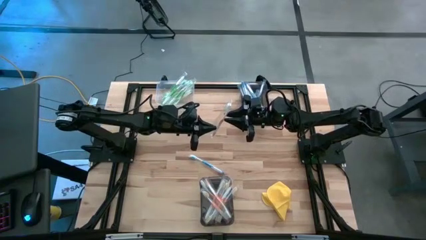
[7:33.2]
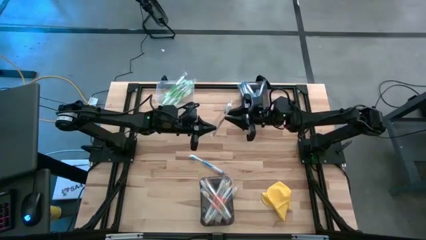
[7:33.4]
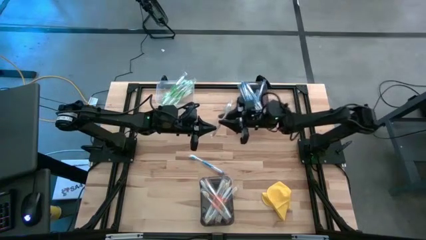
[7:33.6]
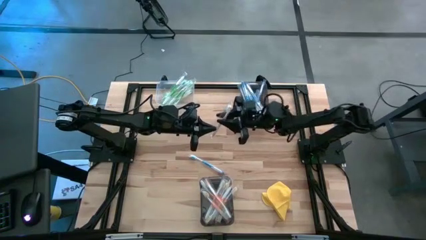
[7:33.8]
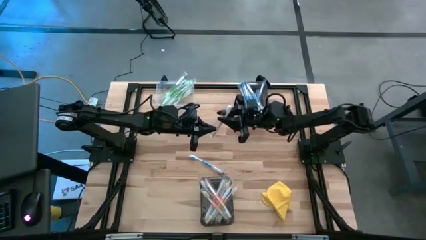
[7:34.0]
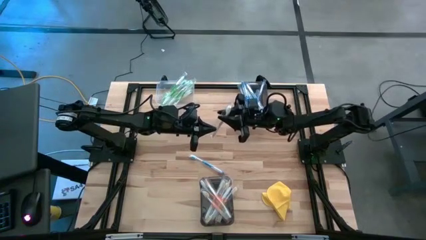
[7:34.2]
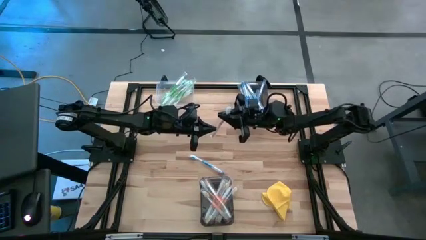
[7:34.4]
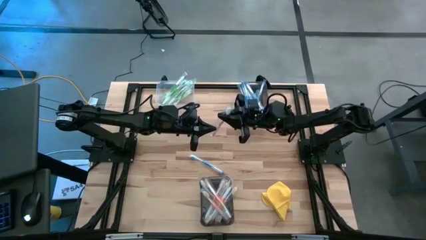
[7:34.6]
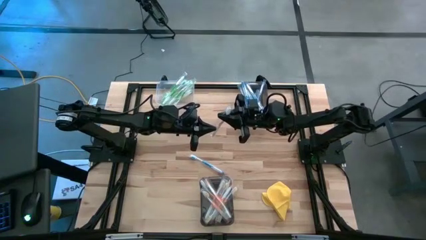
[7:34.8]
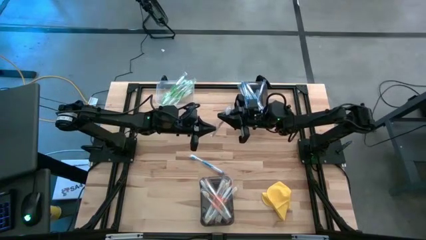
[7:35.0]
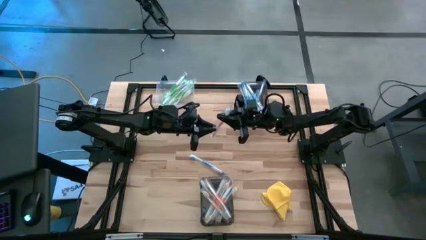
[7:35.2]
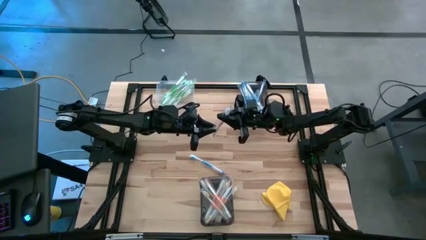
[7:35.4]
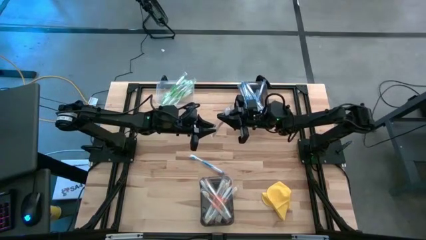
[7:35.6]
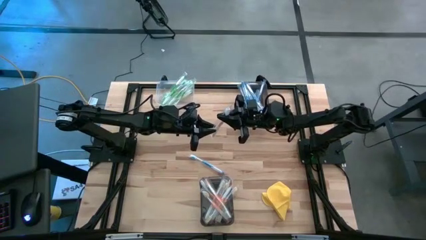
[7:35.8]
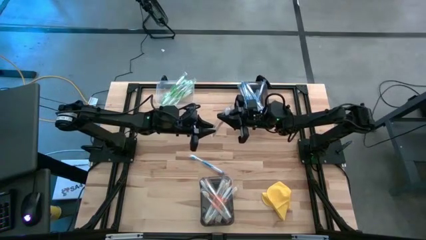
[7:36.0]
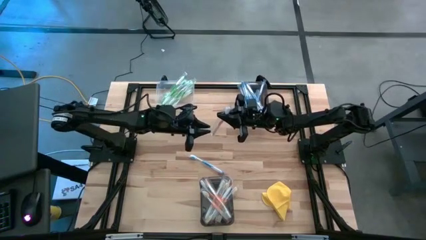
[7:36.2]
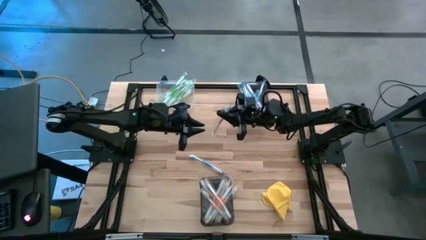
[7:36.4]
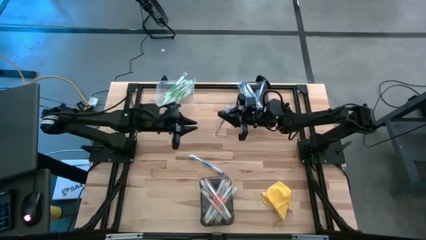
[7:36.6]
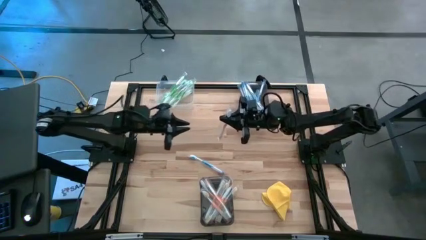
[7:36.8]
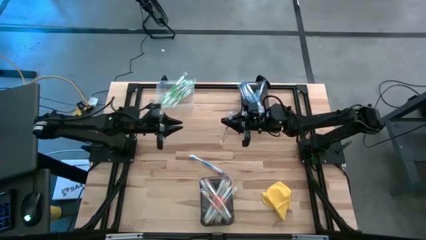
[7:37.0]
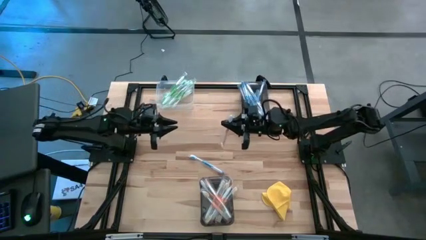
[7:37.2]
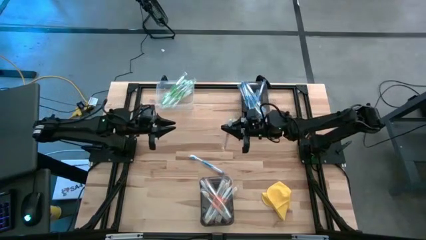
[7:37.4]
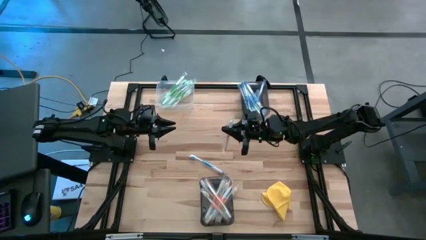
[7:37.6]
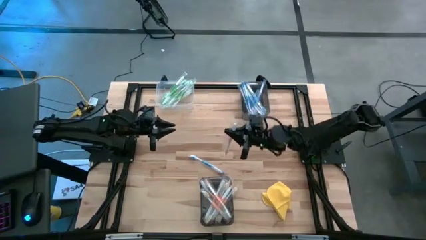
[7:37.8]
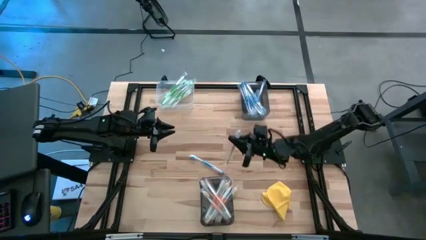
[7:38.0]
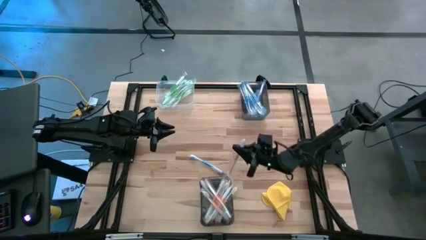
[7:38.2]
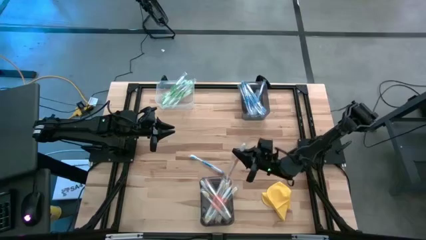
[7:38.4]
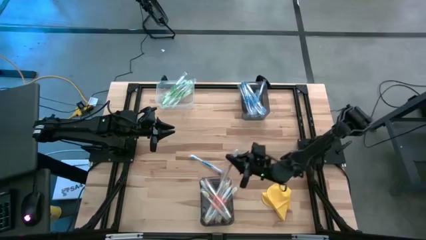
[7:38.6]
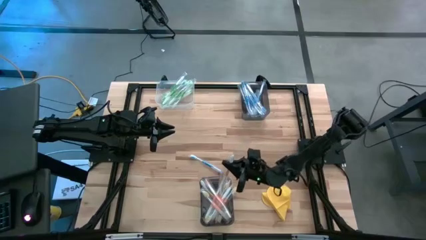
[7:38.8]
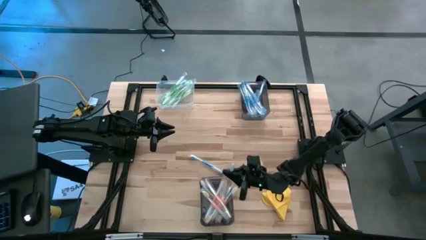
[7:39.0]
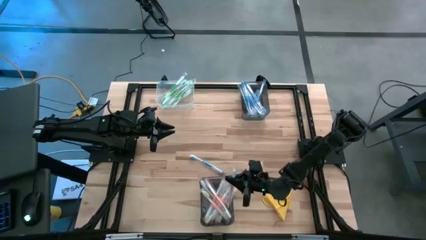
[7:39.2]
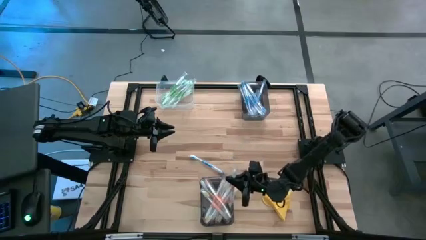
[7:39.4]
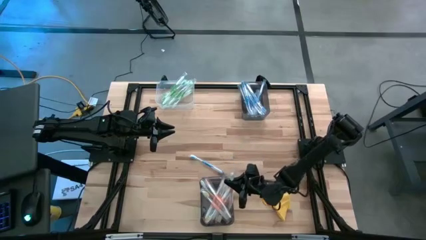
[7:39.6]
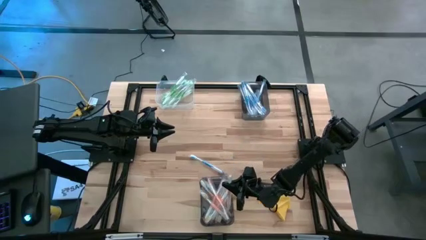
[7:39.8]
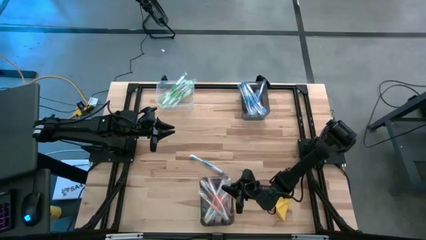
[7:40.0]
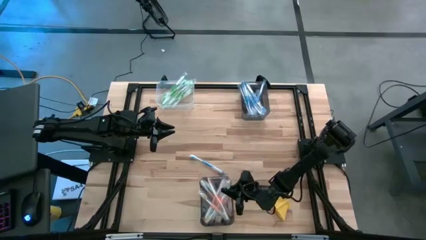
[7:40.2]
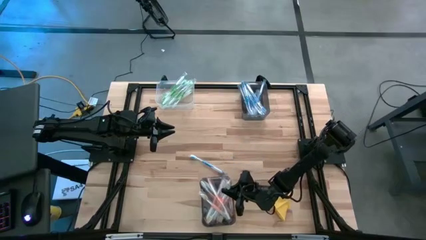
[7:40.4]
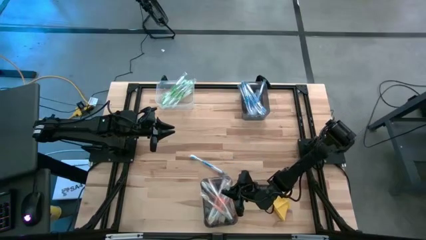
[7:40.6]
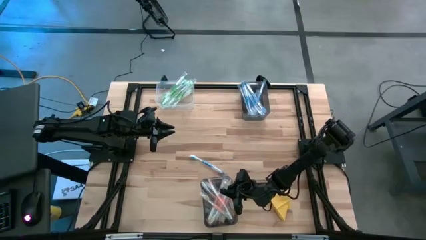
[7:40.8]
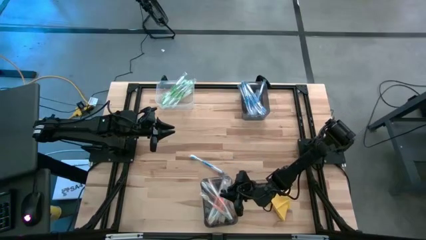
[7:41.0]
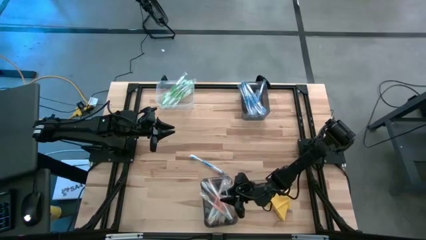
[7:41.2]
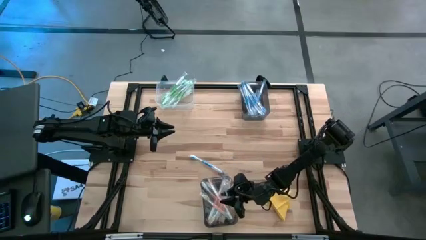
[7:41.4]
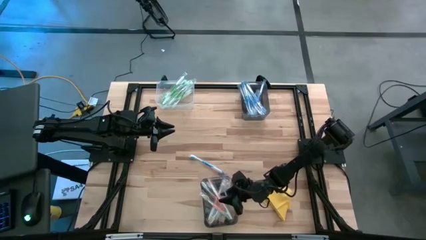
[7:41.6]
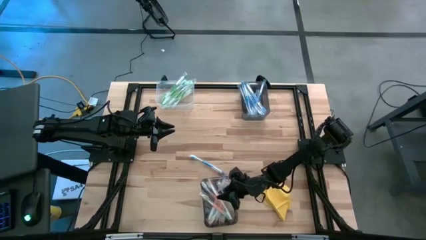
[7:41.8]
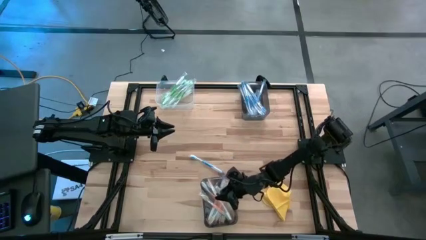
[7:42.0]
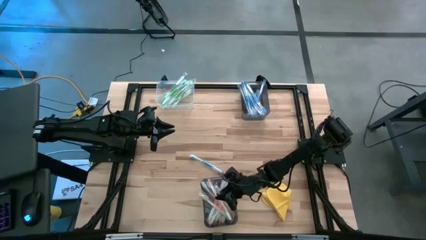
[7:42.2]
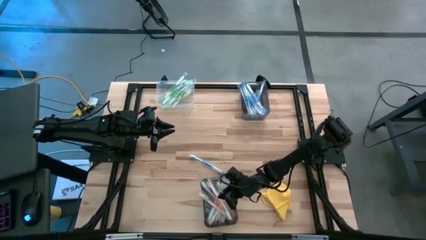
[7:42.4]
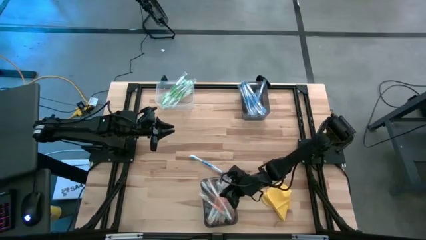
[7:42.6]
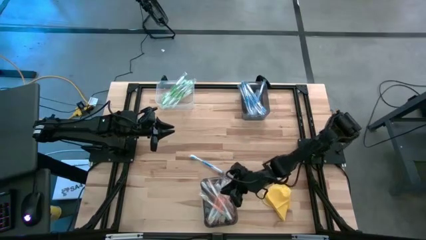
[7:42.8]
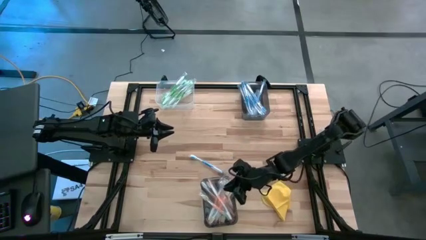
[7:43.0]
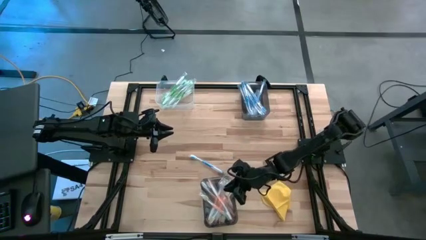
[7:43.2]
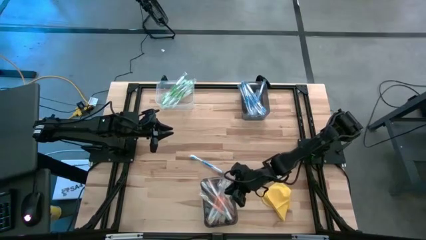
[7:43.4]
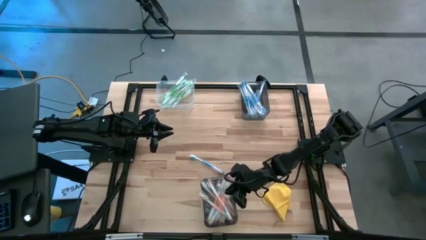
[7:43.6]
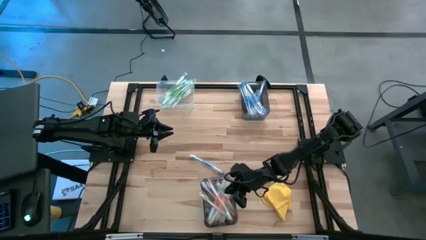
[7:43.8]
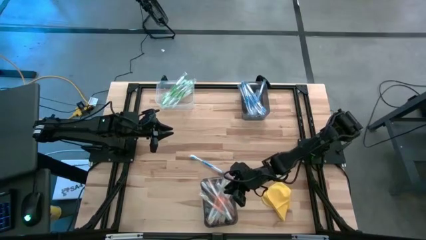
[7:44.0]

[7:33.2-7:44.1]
Task: Pick & Place Toothbrushes
Put the orange toothbrush into the bottom black bin

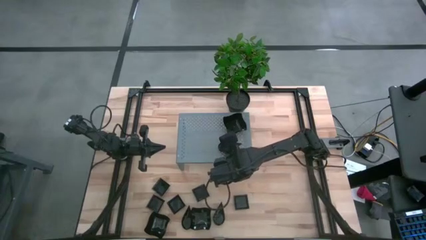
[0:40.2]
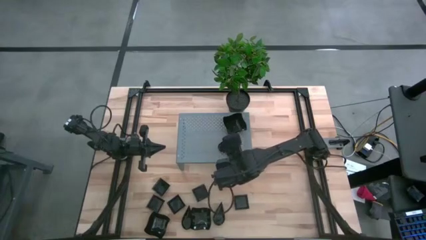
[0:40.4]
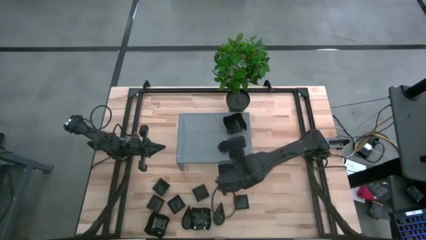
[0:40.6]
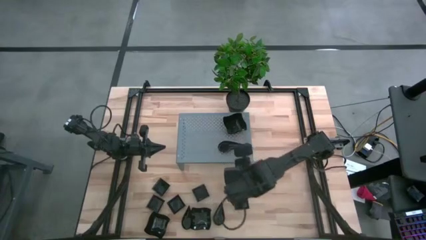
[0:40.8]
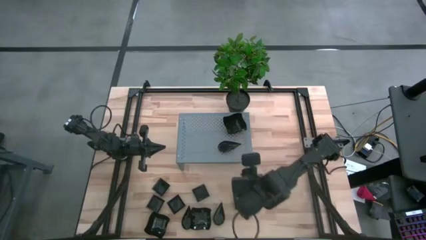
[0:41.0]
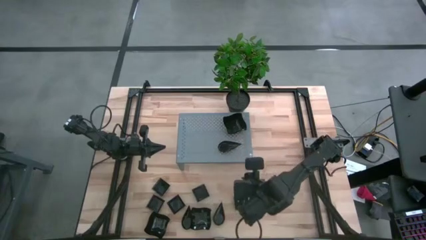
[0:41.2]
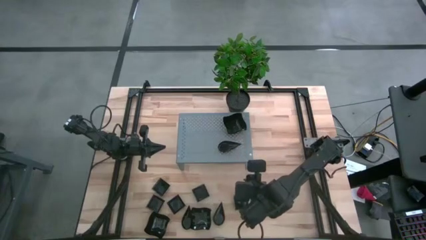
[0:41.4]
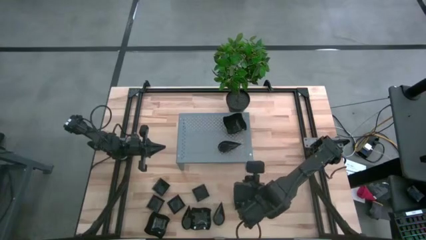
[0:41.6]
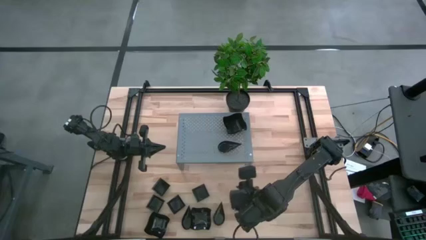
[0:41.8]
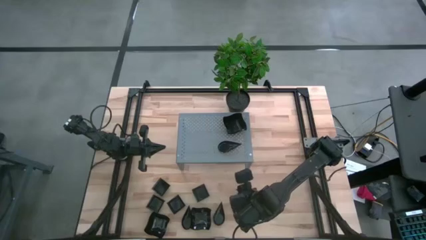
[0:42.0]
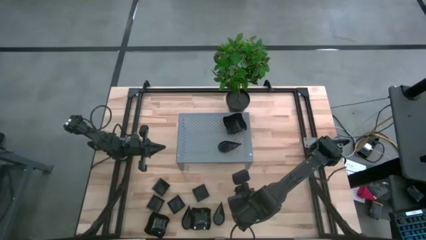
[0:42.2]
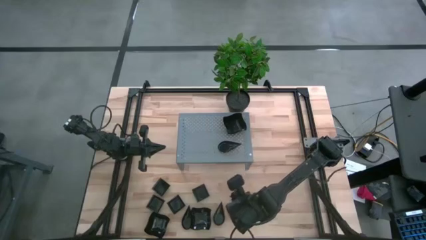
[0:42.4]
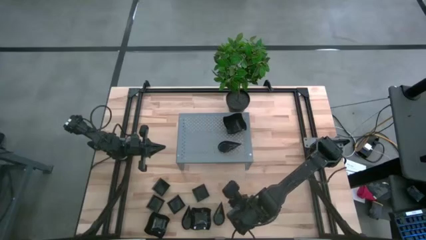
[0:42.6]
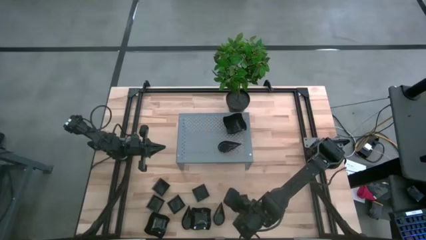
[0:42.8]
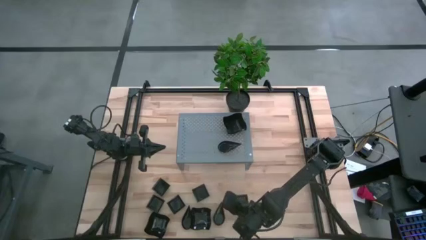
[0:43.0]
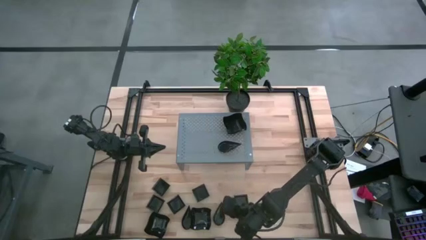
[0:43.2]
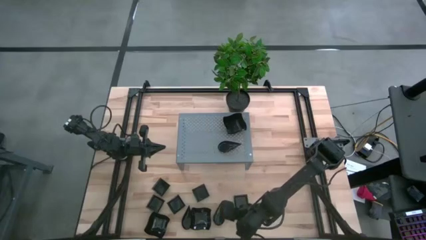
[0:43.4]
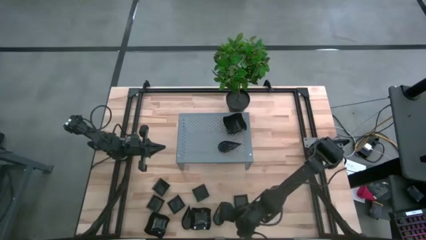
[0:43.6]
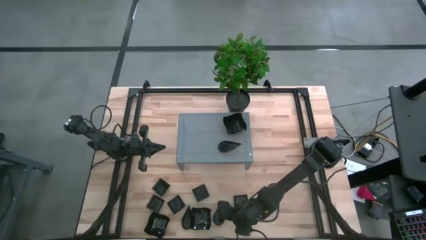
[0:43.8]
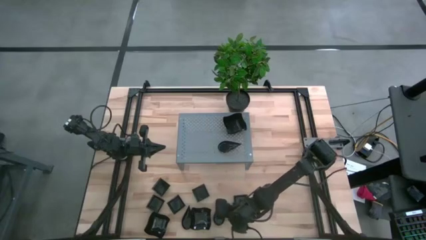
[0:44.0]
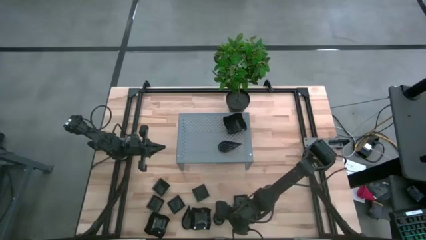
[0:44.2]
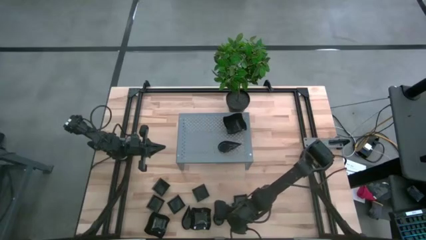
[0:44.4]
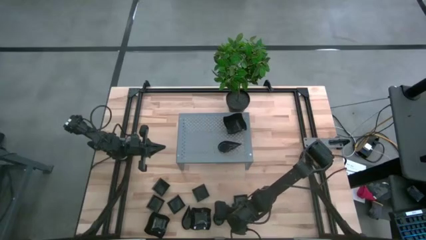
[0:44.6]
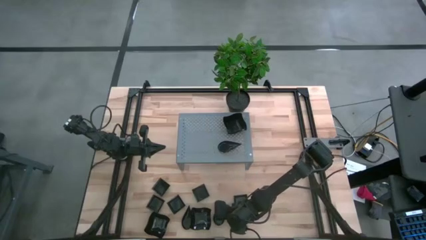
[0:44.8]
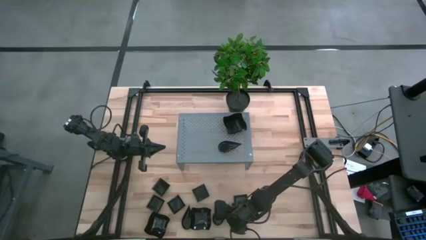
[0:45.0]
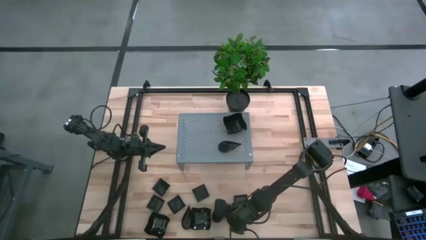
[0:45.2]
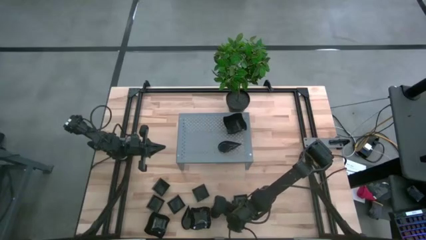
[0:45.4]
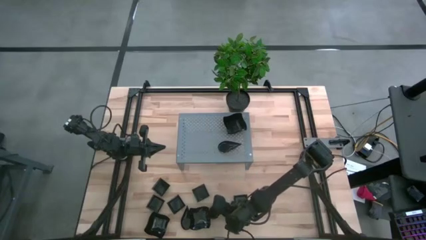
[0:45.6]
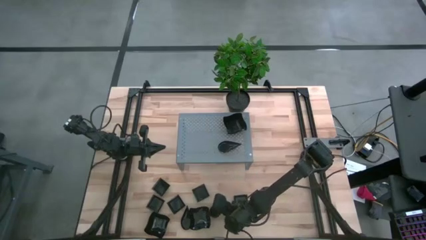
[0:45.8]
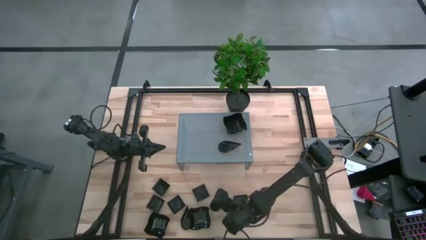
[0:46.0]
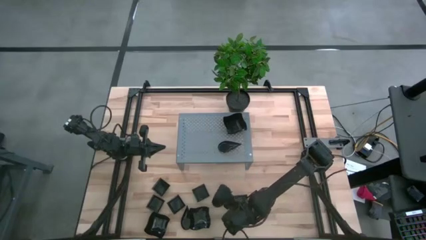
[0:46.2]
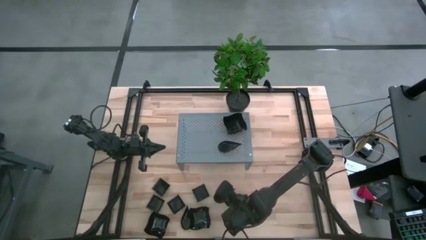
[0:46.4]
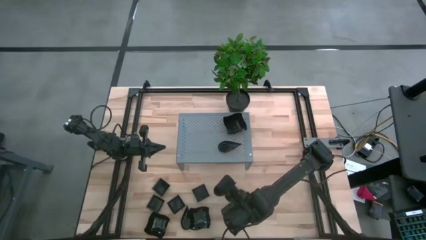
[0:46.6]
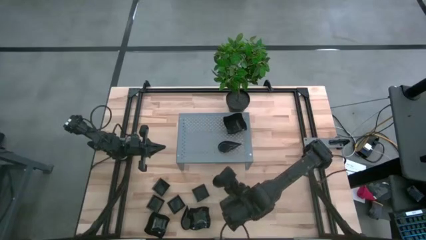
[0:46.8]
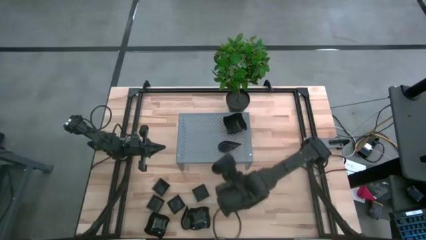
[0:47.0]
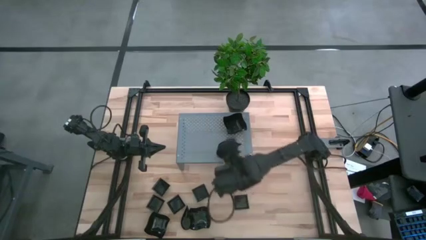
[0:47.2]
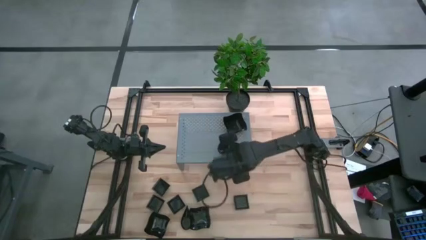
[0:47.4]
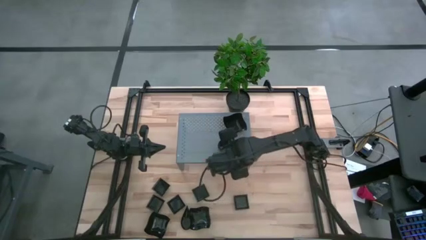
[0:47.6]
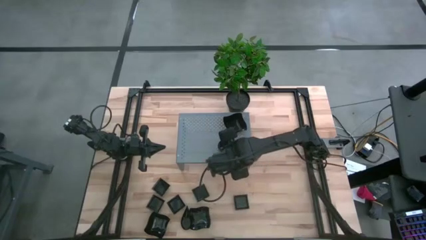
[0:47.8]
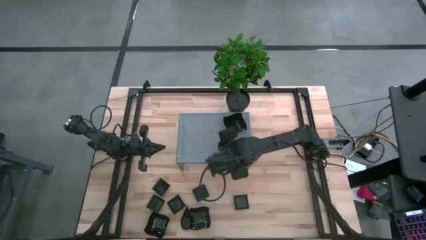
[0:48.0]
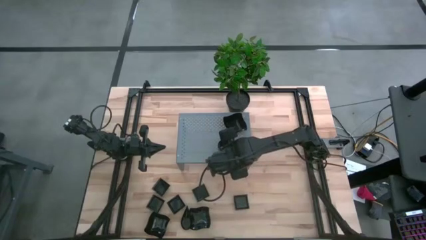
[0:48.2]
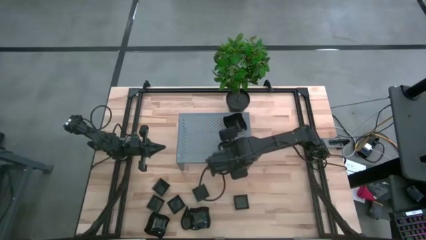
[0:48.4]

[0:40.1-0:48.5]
Task: Pick & Place Mini shaped plates
Stack the black drop-shaped plate on the black drop-shaped plates on the shelf
